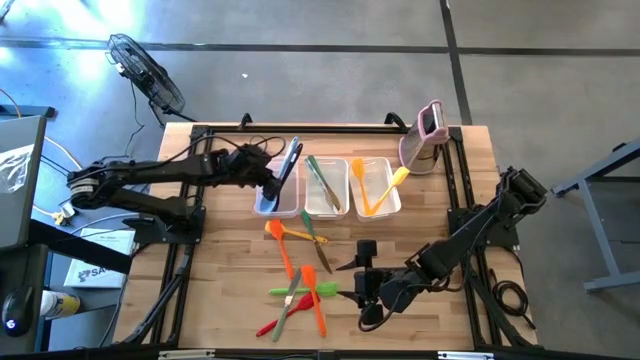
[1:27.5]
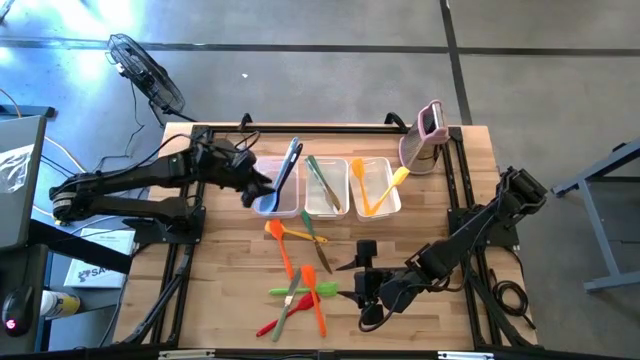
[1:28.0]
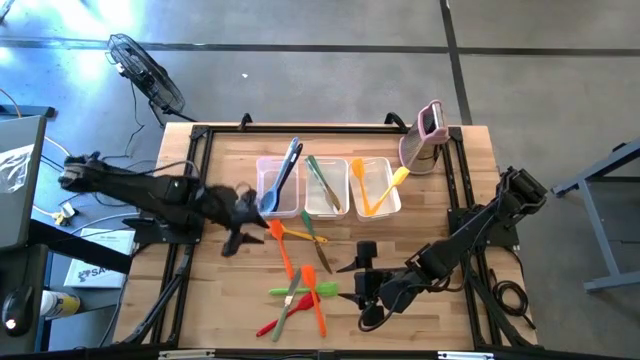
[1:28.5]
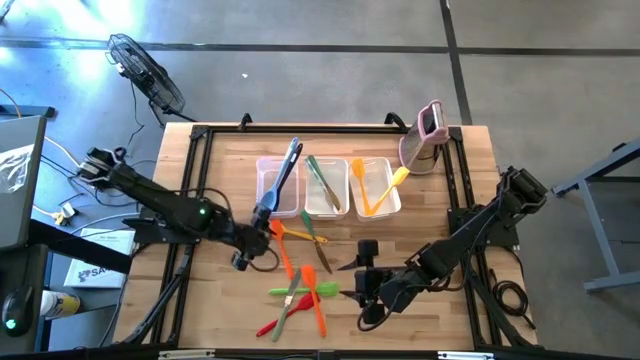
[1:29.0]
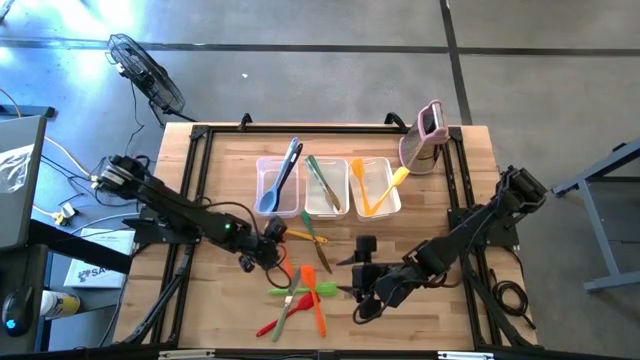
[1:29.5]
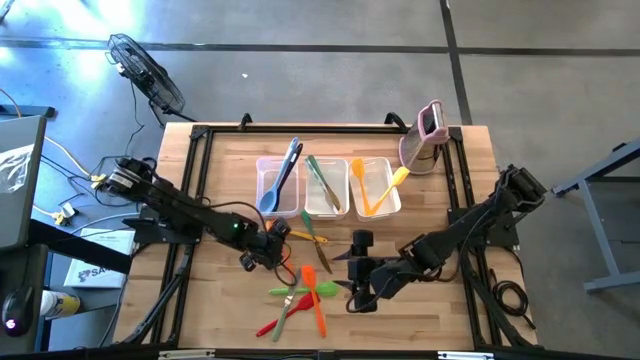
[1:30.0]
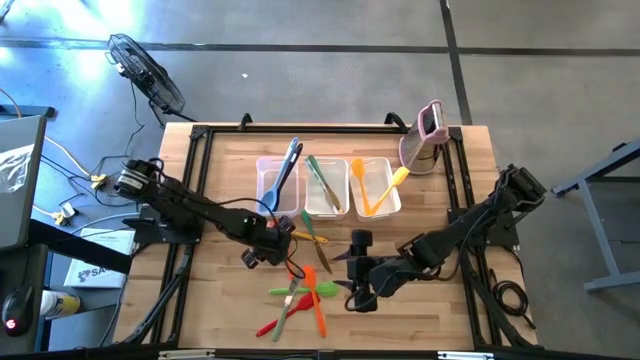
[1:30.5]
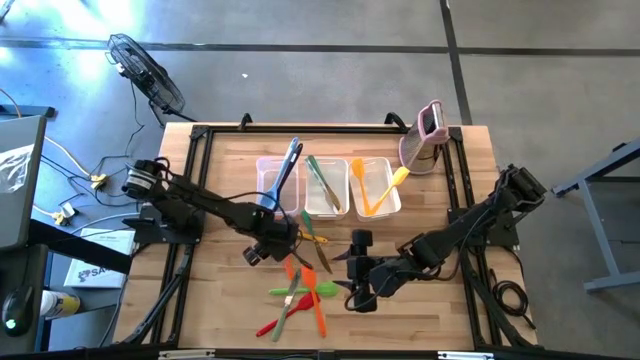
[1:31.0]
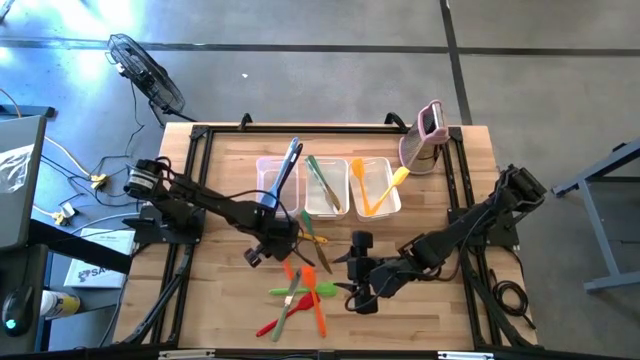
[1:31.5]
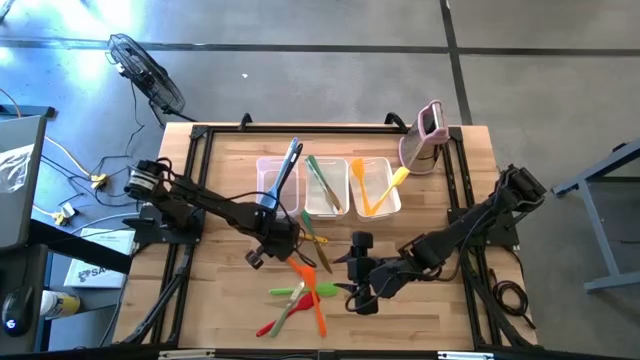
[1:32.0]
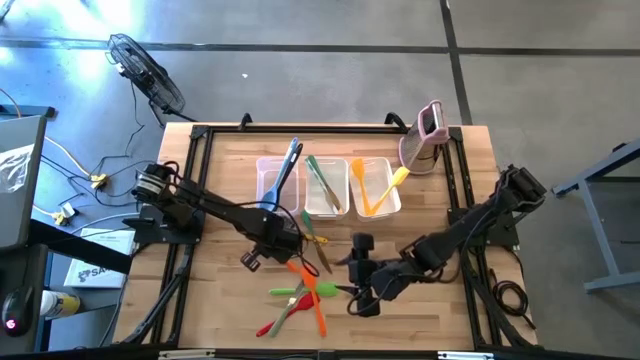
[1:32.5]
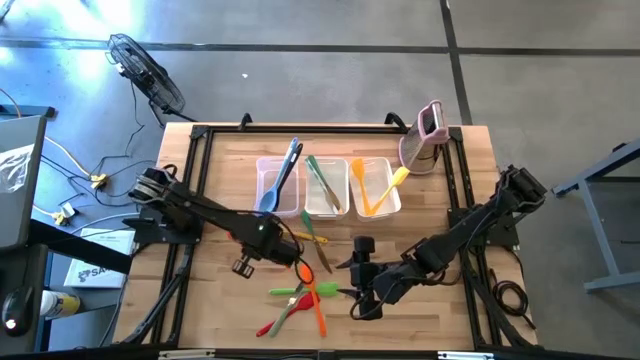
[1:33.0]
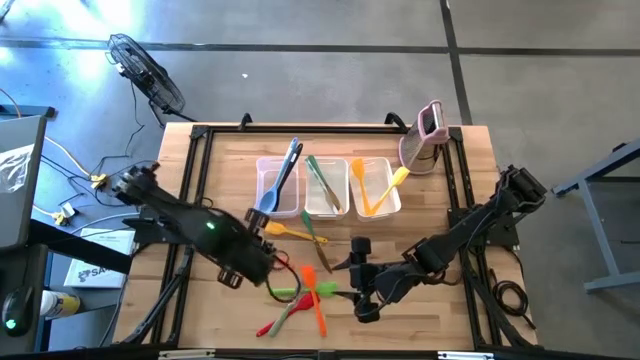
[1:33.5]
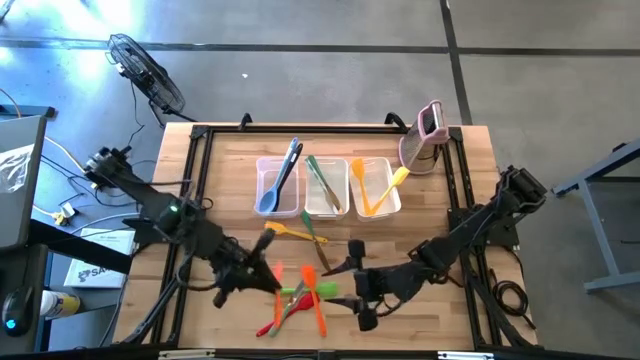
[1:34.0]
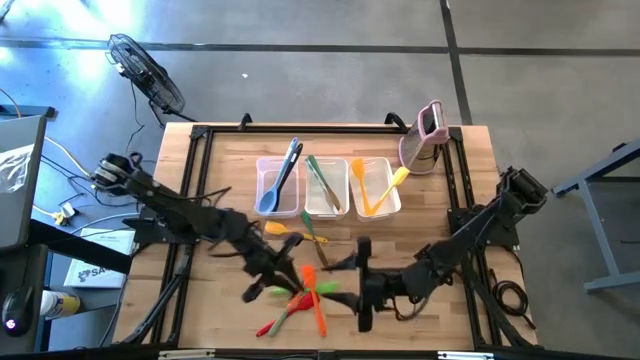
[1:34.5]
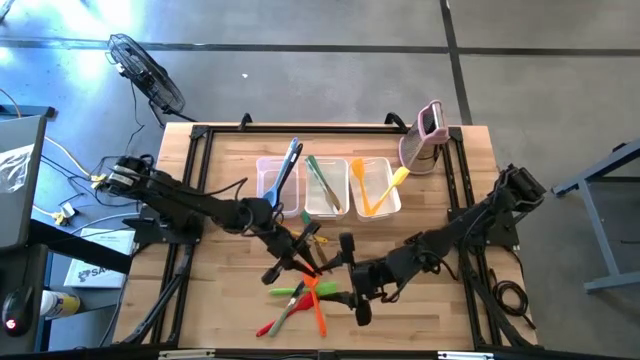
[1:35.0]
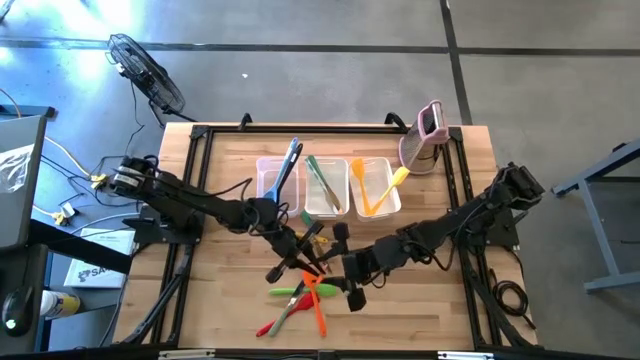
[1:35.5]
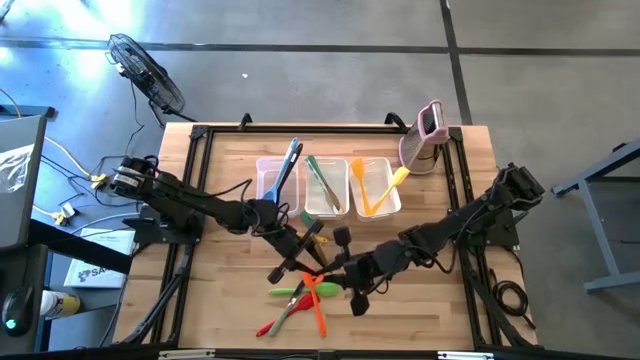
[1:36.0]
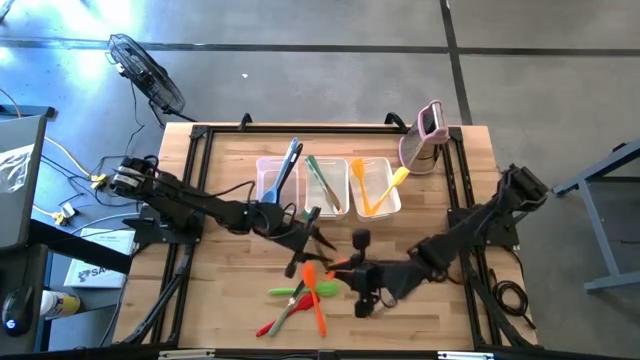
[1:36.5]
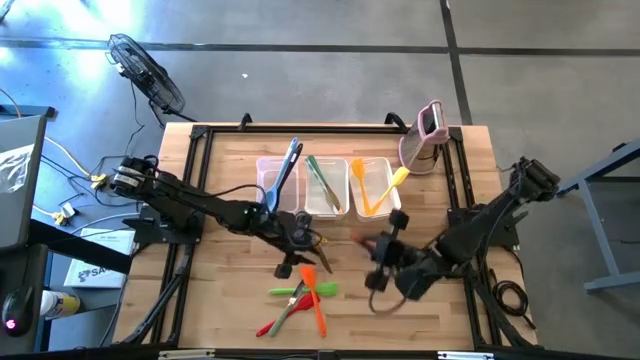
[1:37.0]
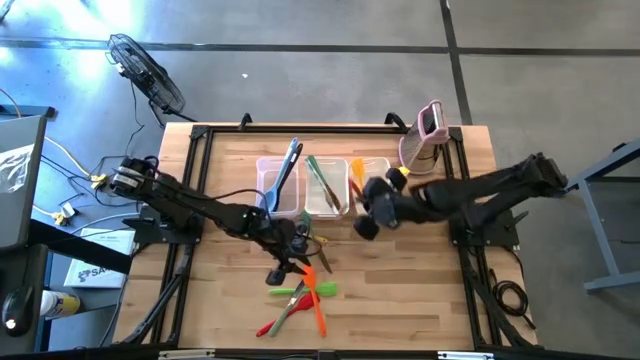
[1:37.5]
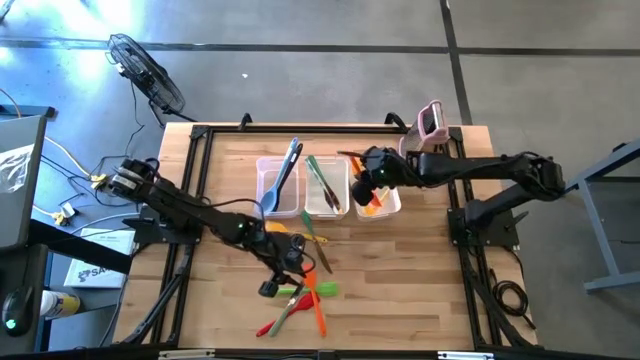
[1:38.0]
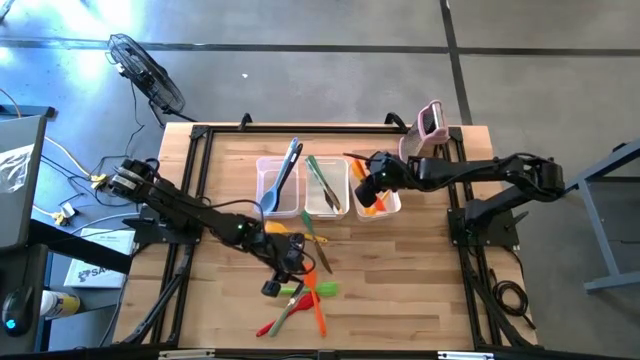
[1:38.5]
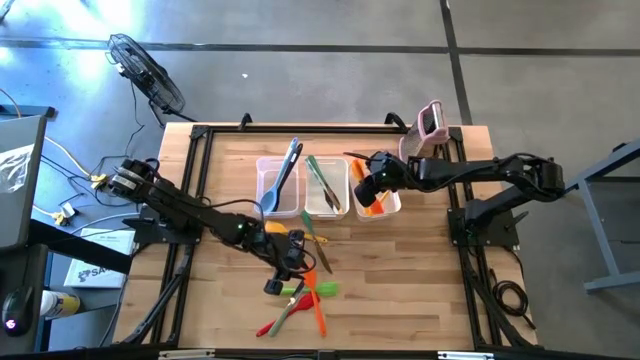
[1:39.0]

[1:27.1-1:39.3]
Task: Pick & Place Kitchen Items
Put the left orange spatula into the right white bin

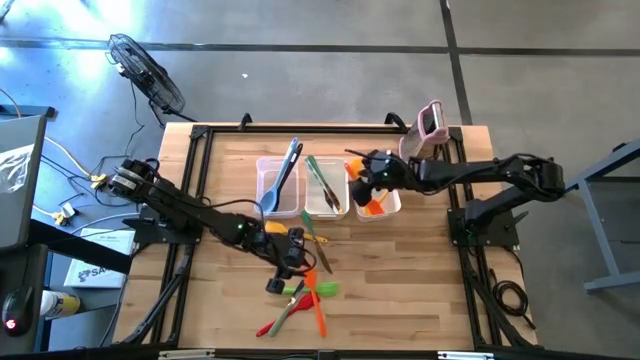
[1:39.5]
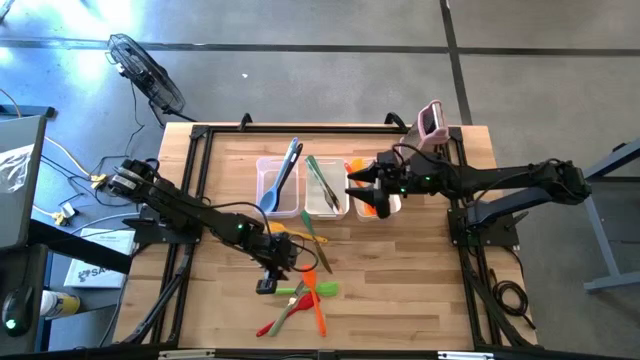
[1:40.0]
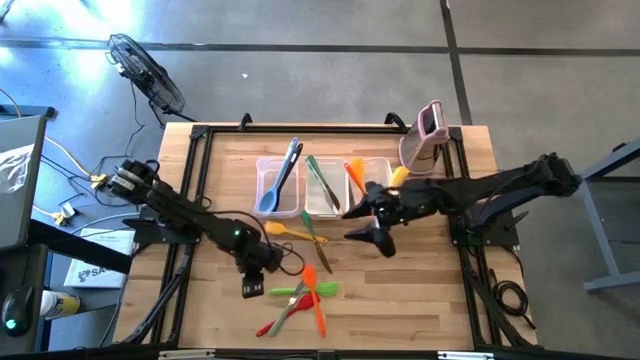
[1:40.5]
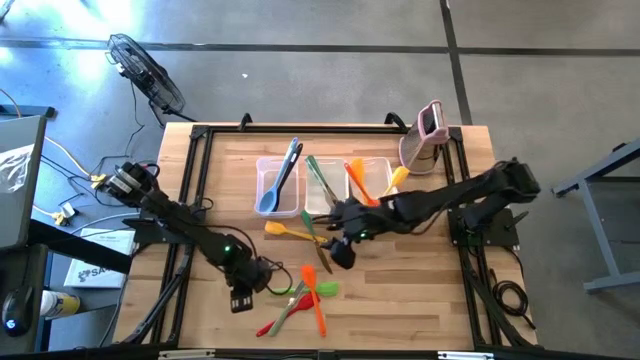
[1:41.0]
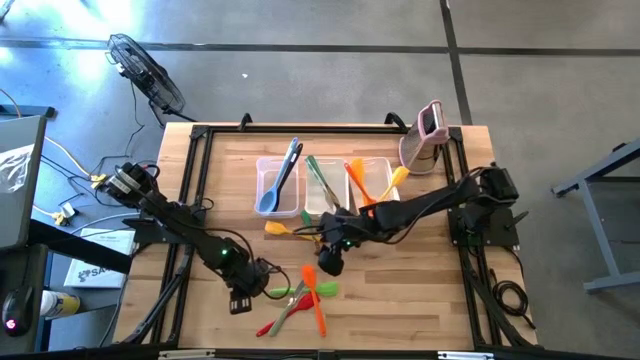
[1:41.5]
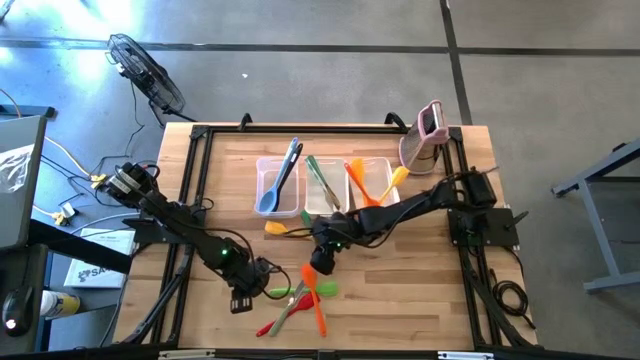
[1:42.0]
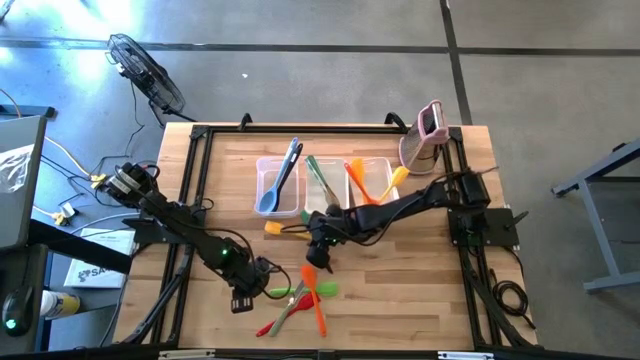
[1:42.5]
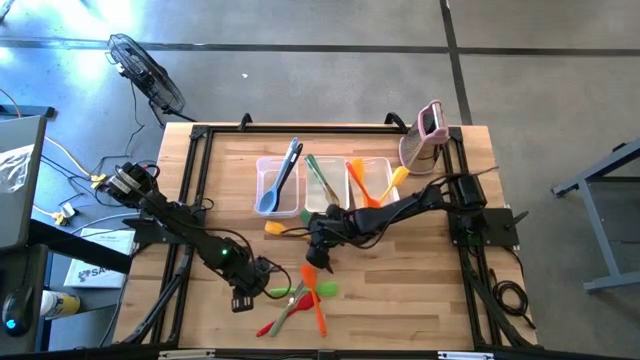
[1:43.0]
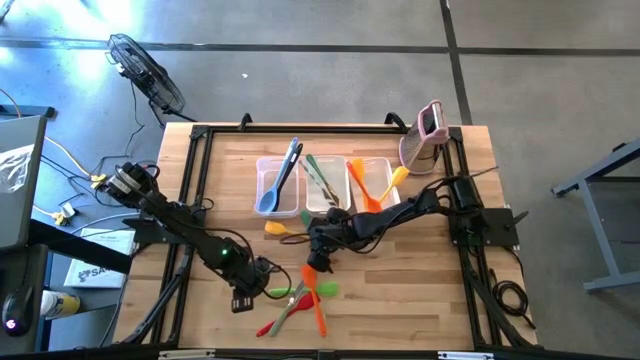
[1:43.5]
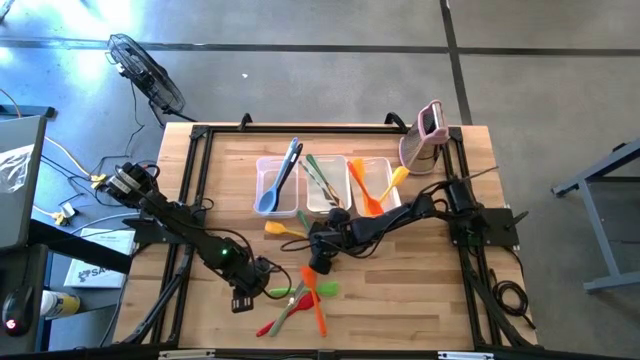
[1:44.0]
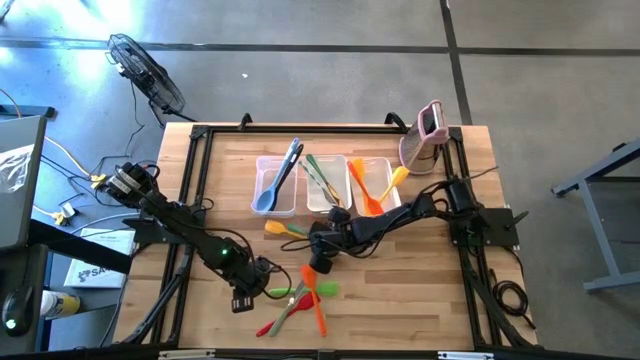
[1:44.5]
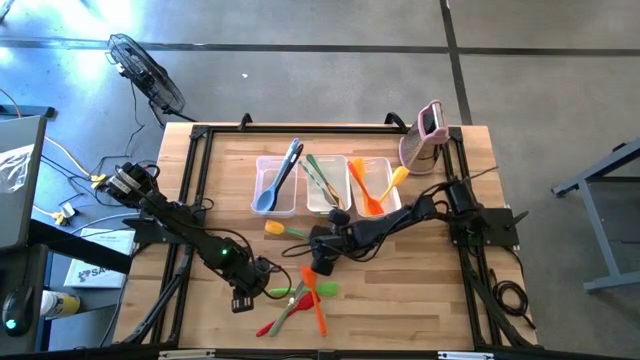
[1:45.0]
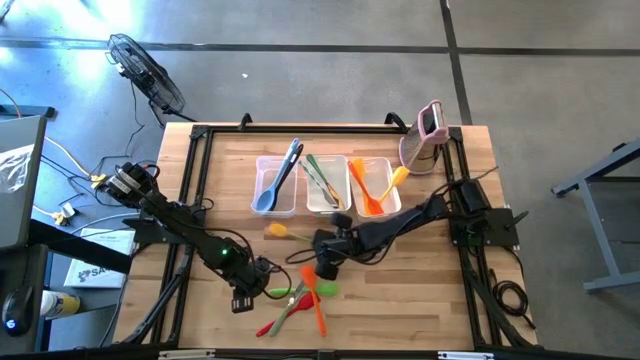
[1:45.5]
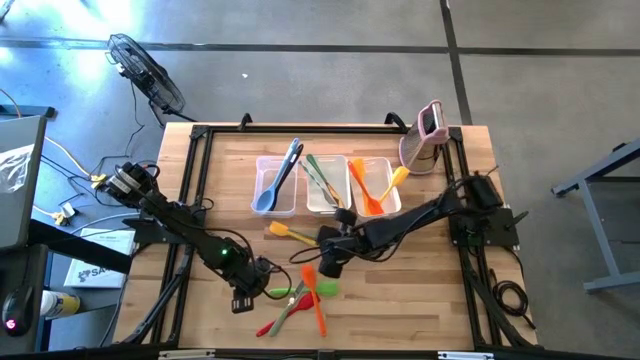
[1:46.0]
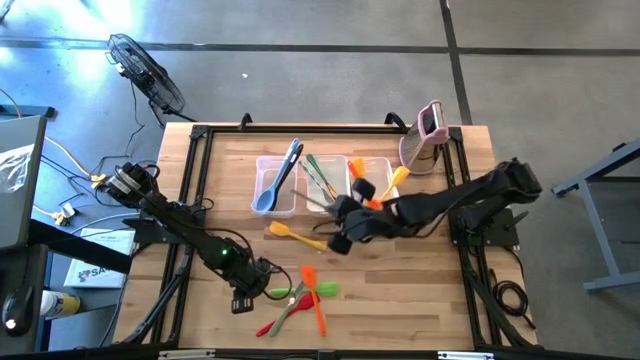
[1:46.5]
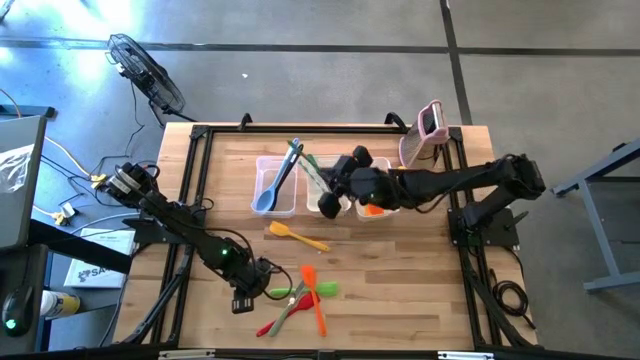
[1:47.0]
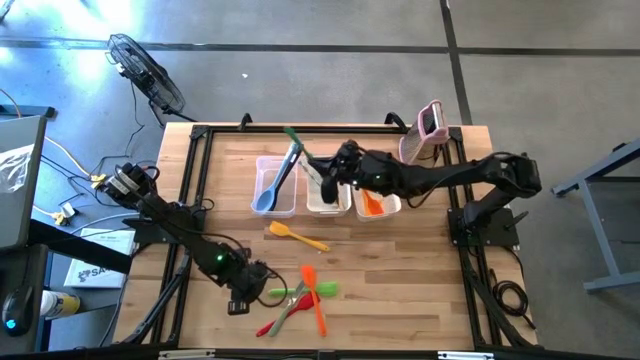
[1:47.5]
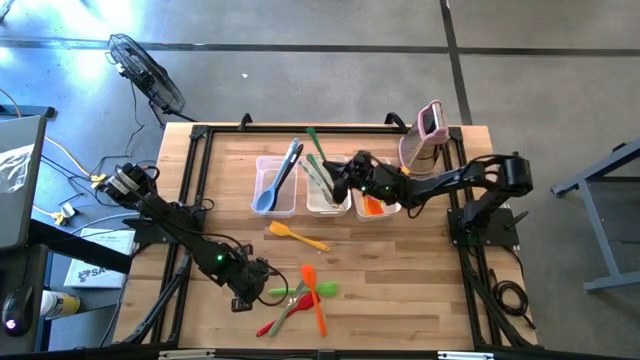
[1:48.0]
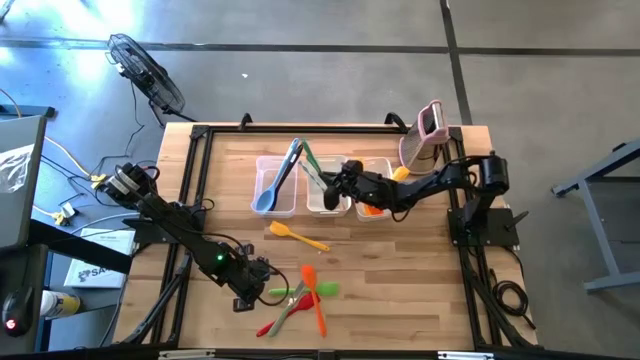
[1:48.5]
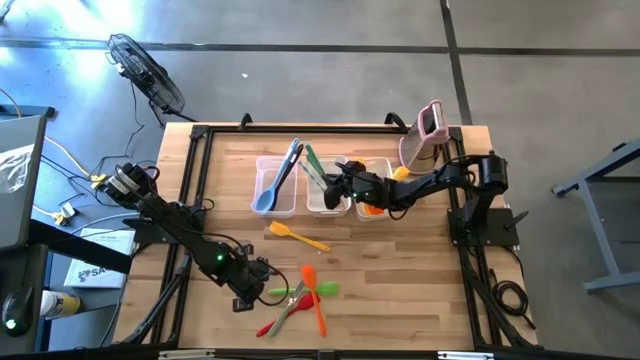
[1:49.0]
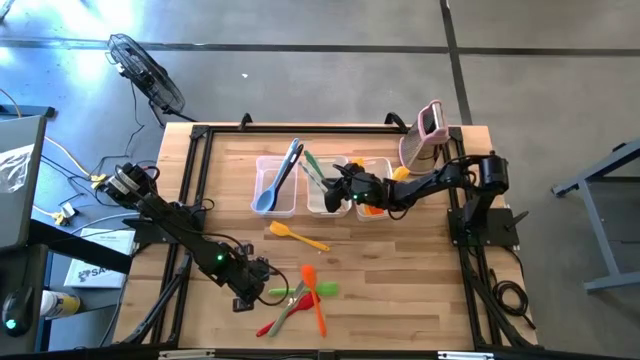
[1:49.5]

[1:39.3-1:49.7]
Put the green knife into the left white bin
